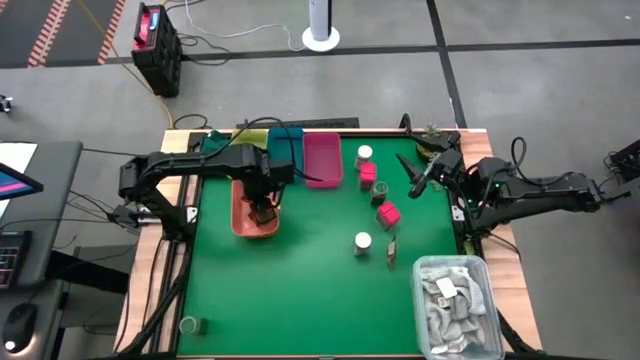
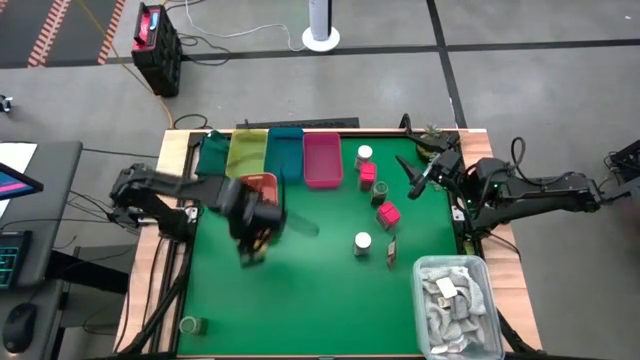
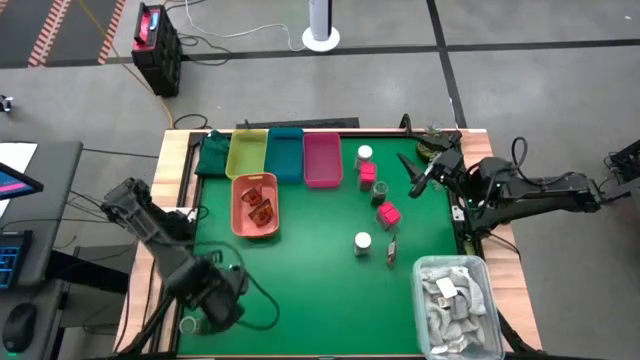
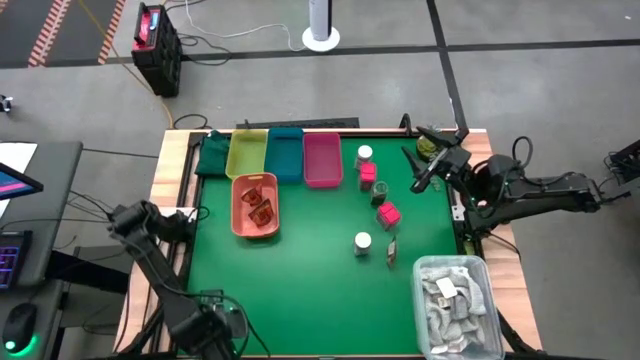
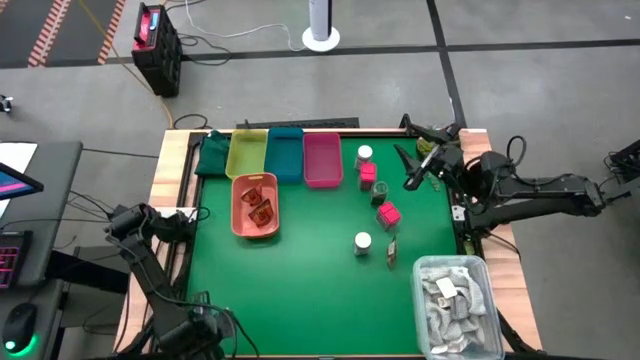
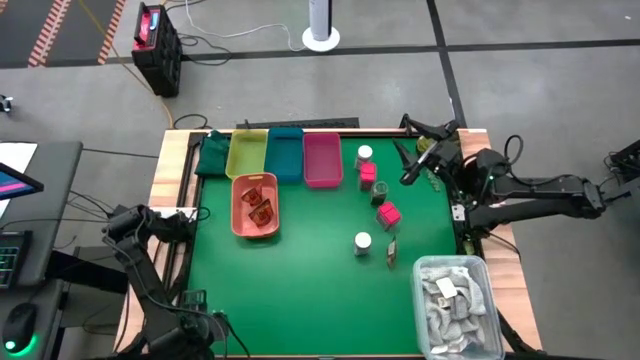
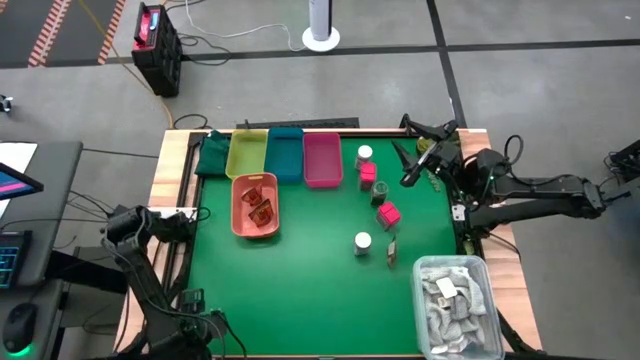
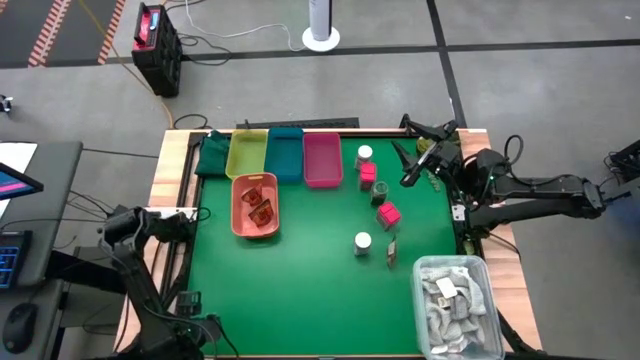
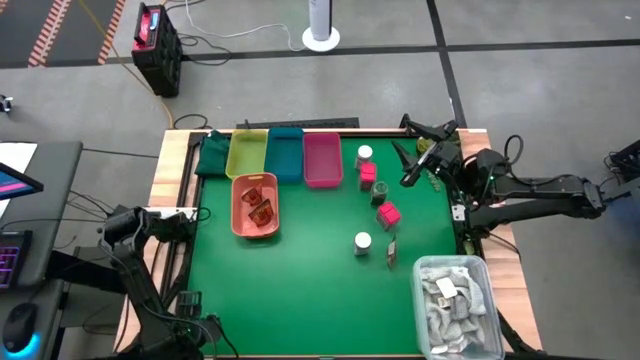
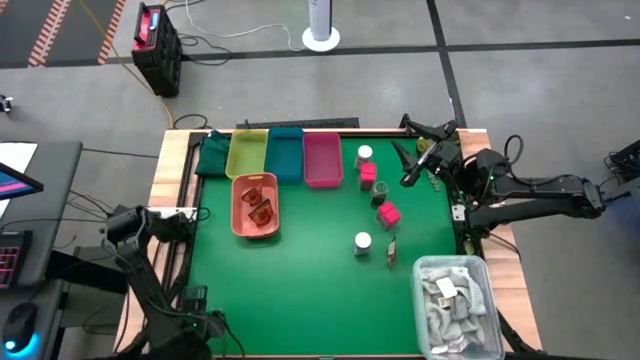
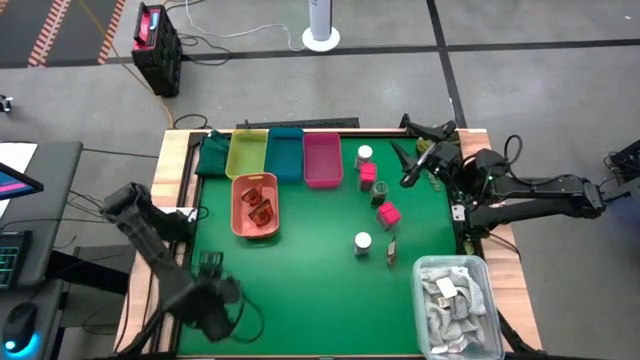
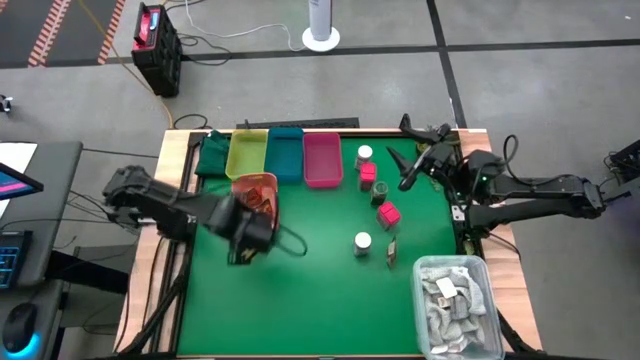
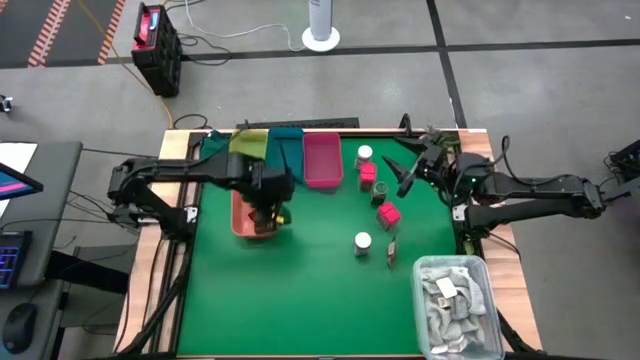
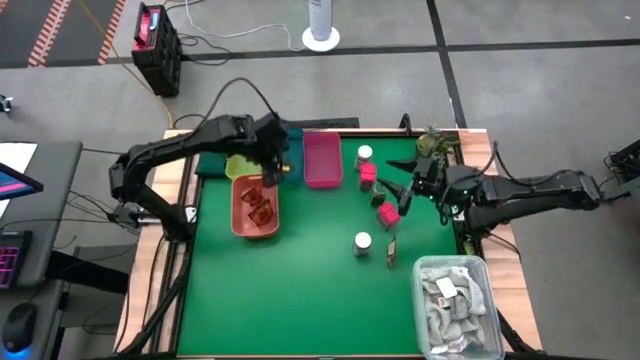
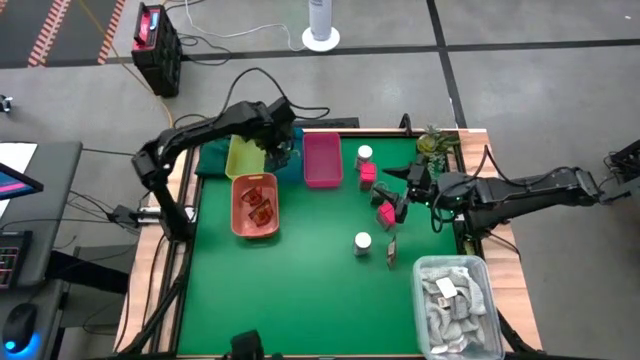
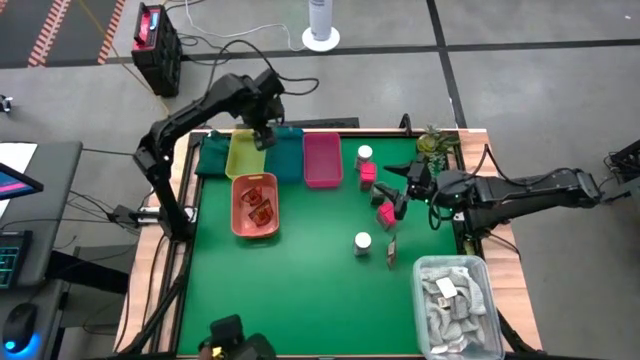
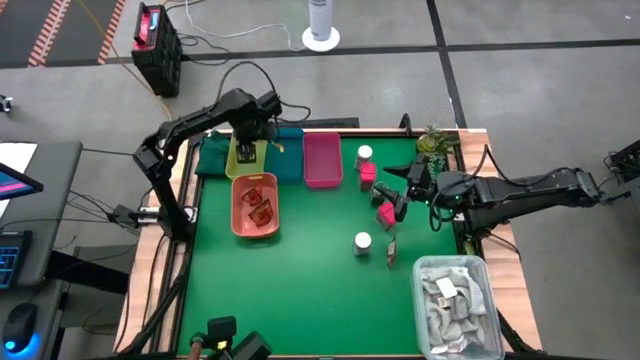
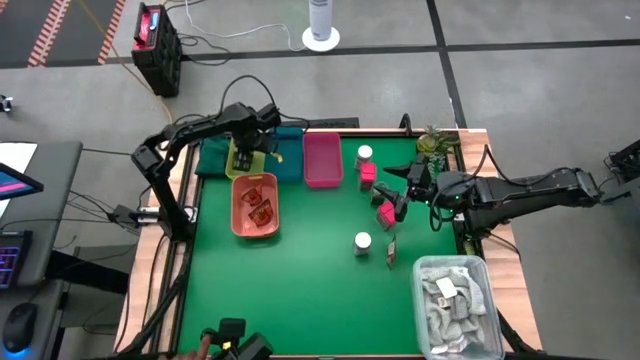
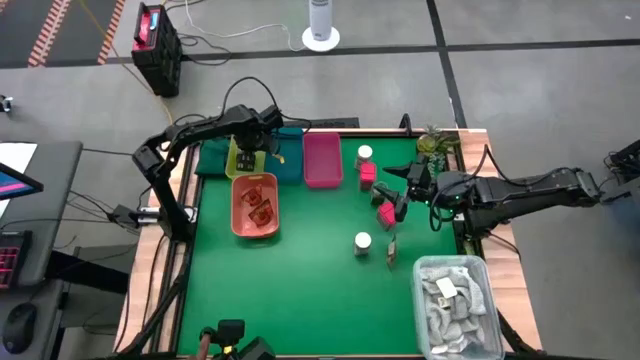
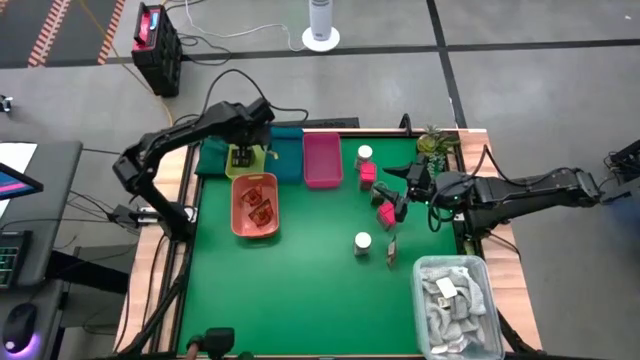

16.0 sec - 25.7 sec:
Task: Sort spices by type
Put the bottom green seasoning bottle into the yellow bin

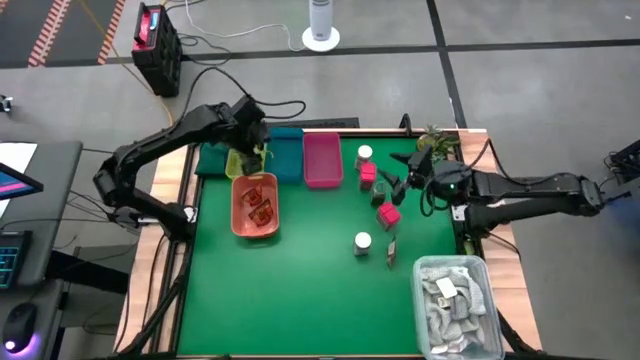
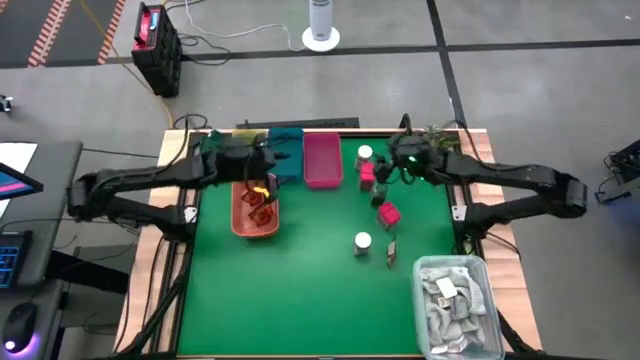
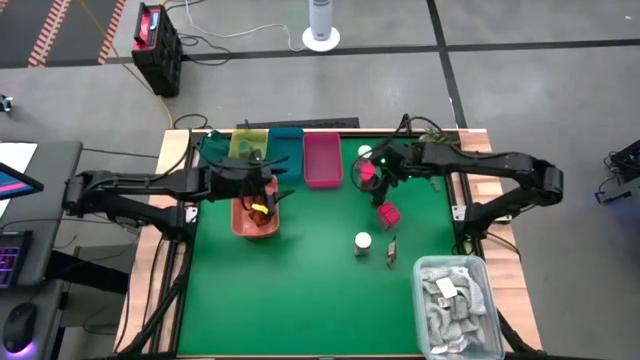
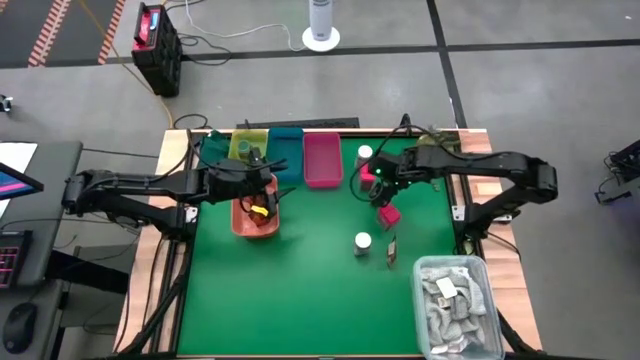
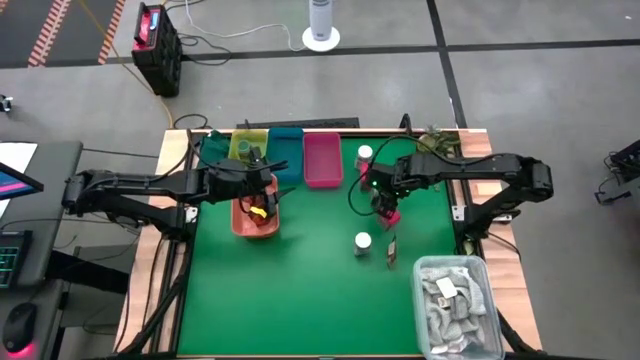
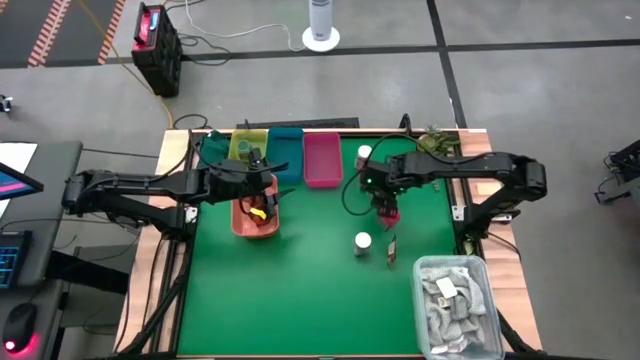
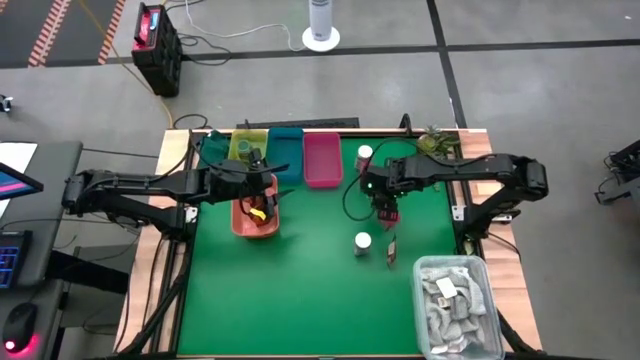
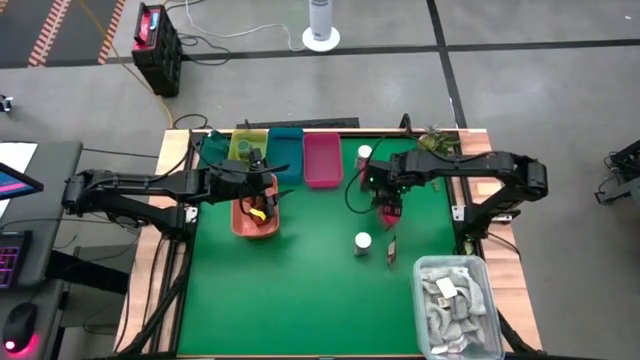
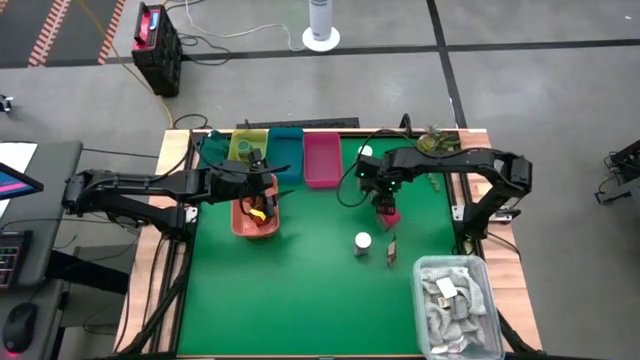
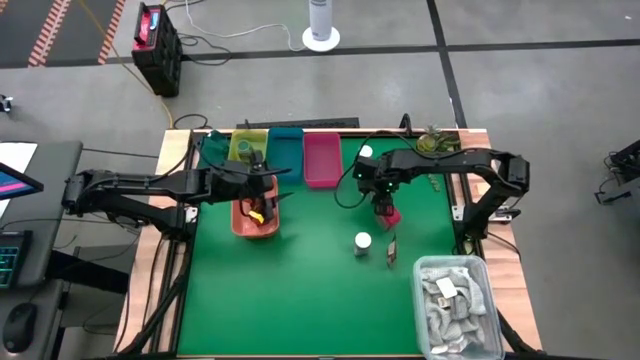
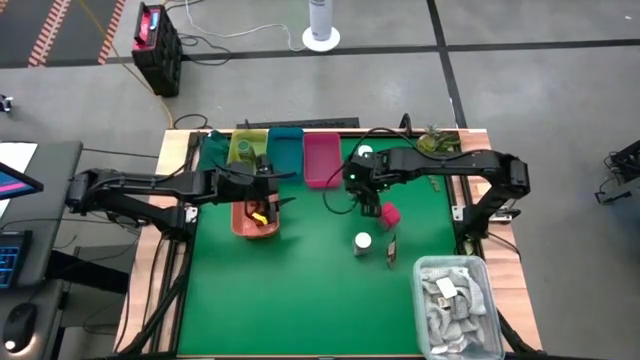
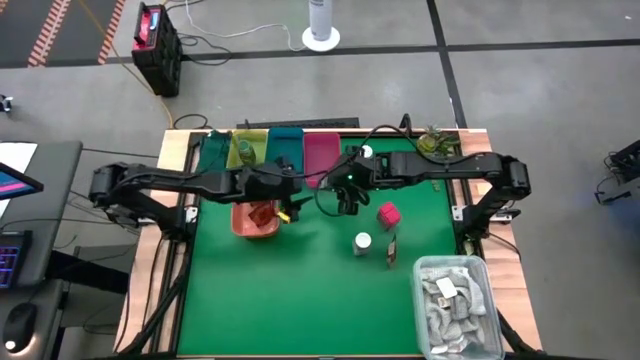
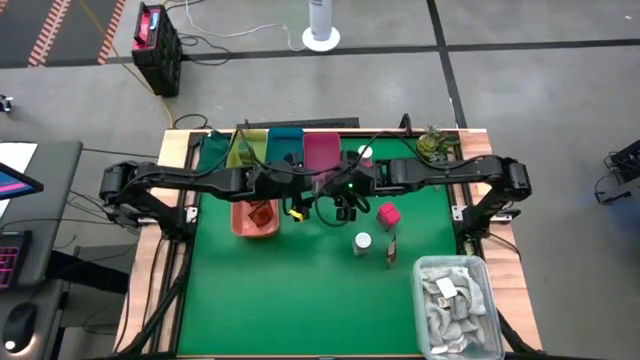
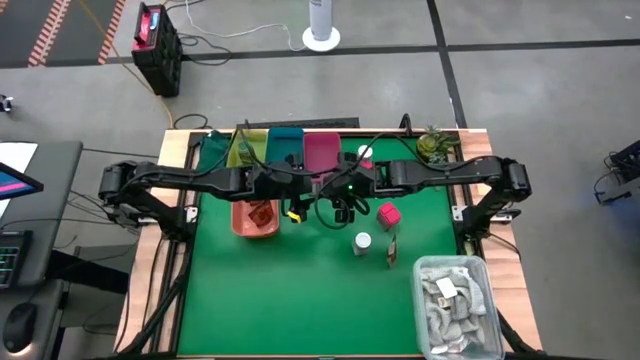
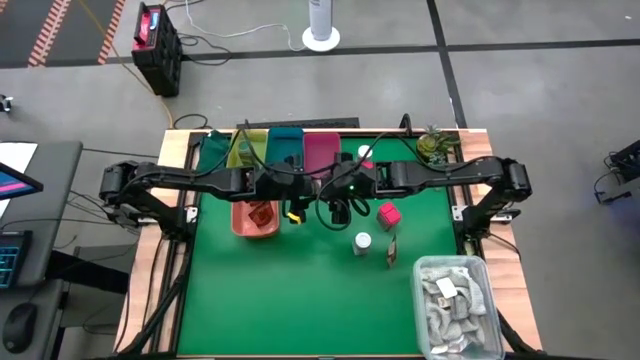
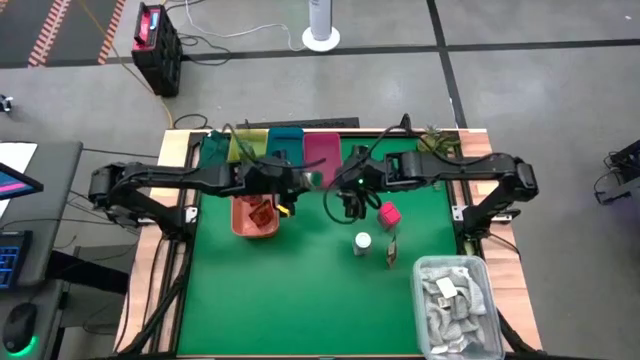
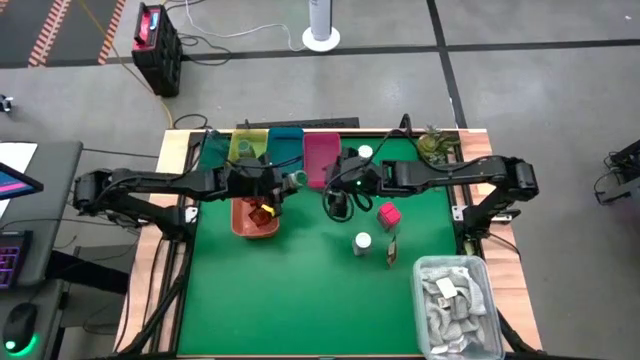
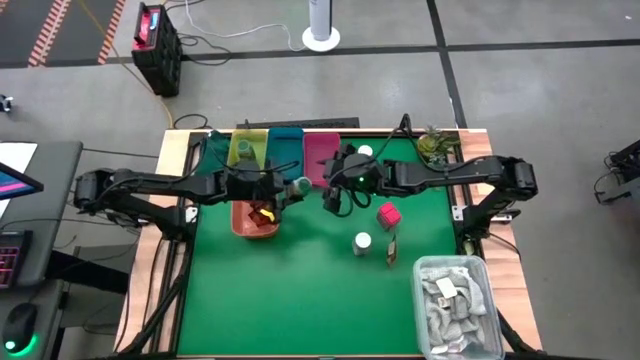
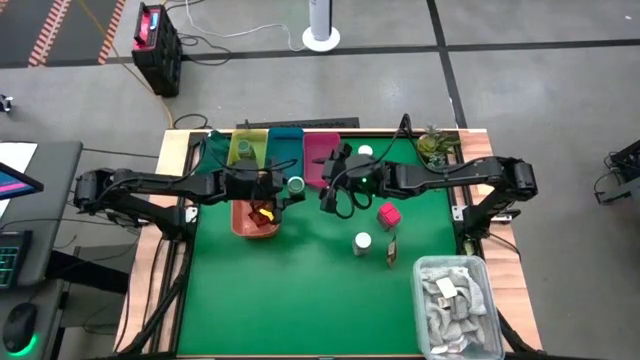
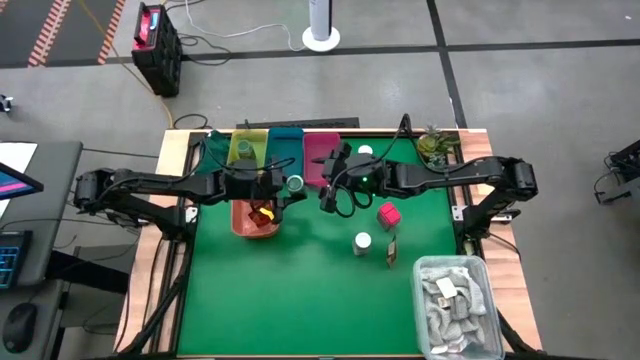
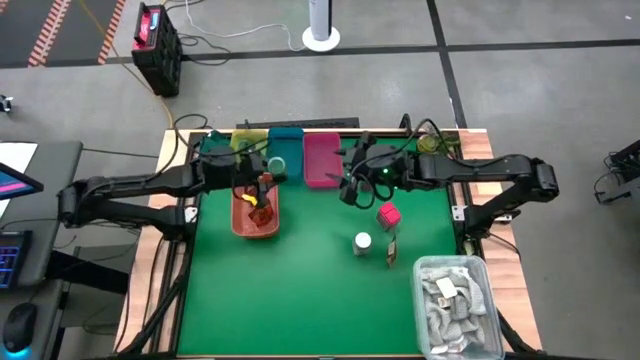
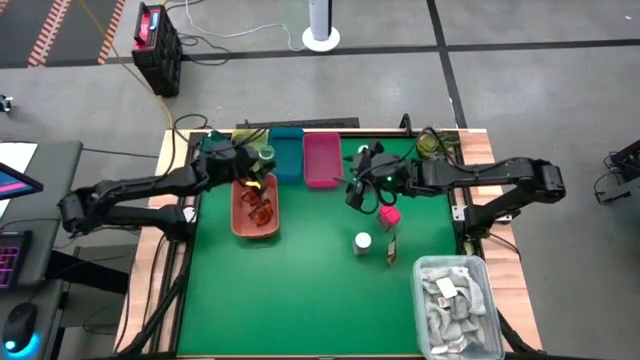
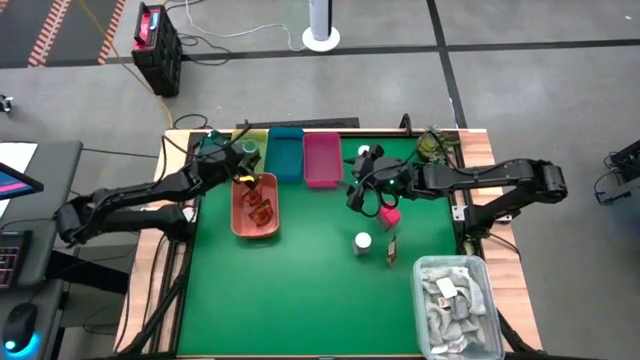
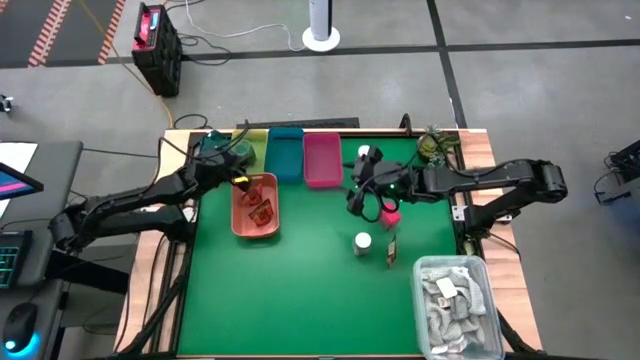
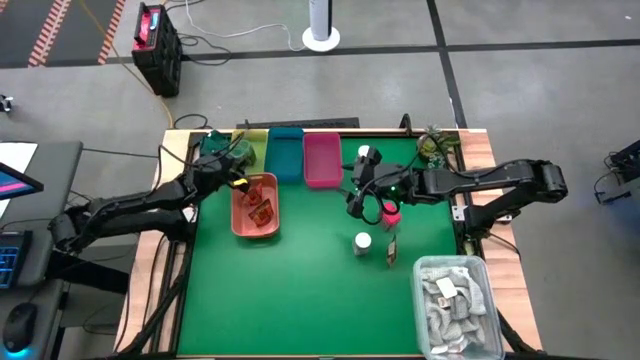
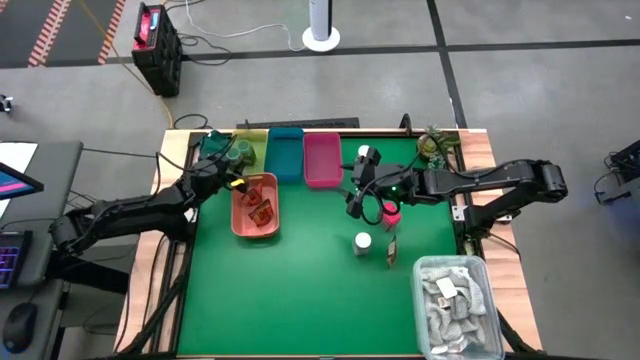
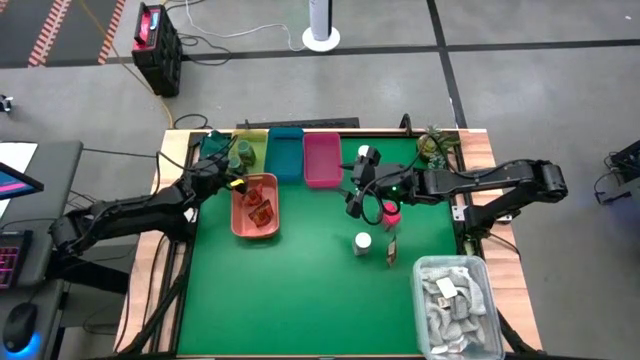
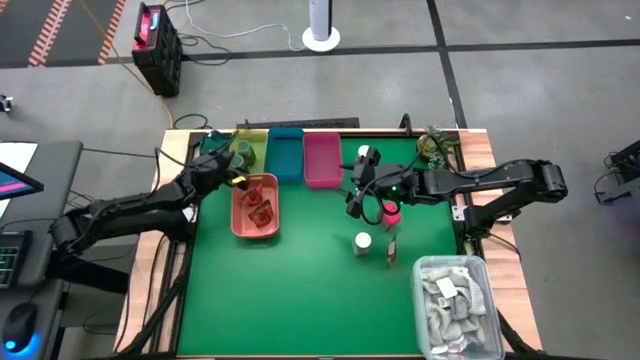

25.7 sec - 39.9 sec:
Put the green seasoning bottle into the yellow bin
